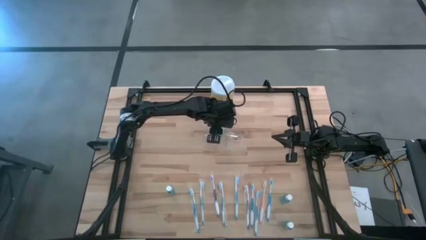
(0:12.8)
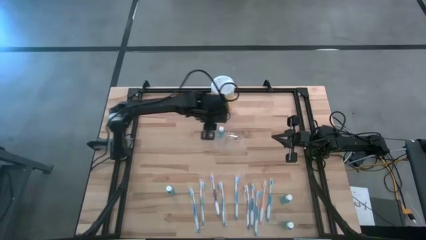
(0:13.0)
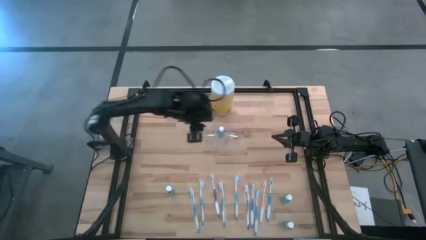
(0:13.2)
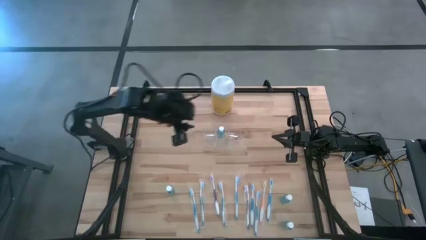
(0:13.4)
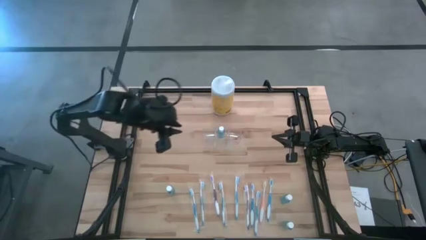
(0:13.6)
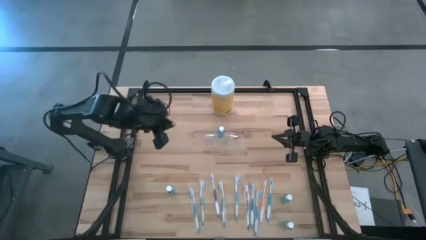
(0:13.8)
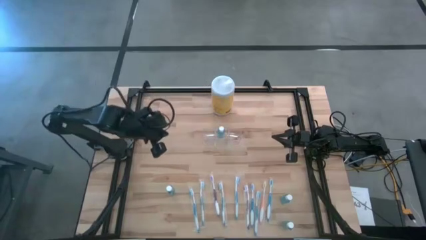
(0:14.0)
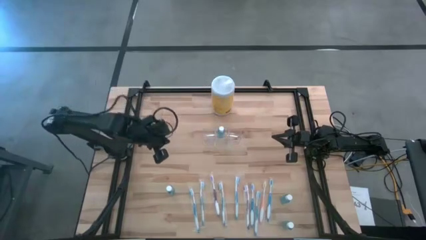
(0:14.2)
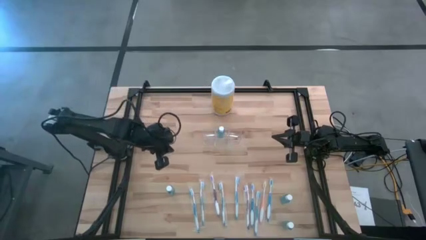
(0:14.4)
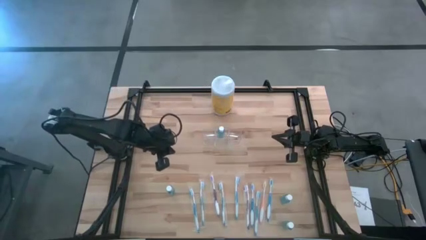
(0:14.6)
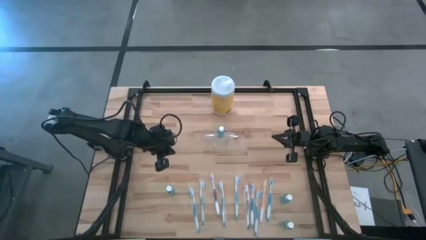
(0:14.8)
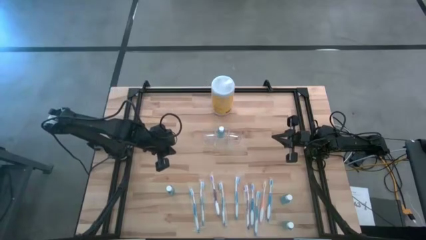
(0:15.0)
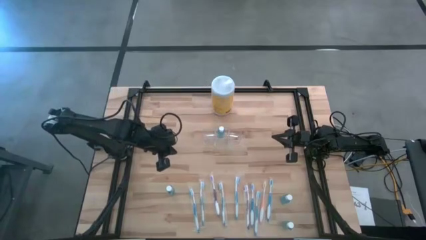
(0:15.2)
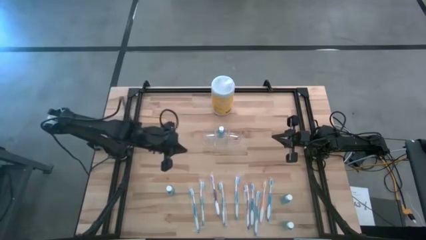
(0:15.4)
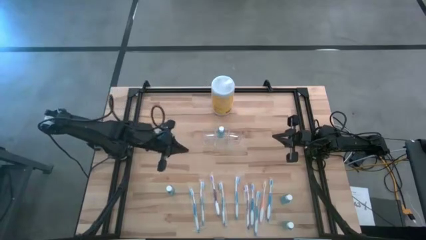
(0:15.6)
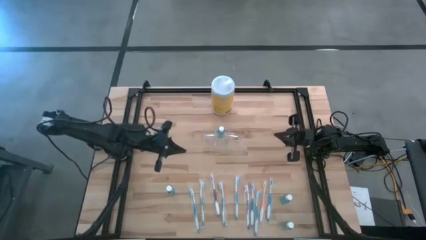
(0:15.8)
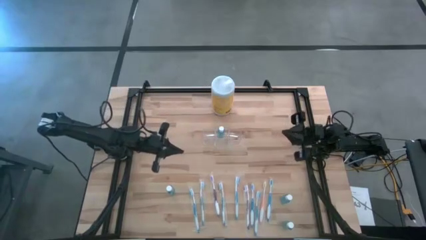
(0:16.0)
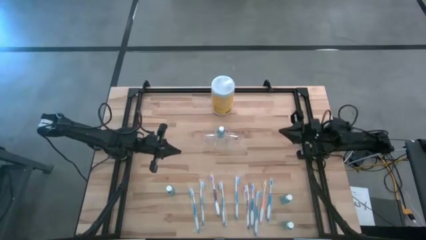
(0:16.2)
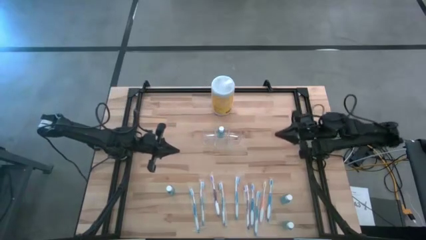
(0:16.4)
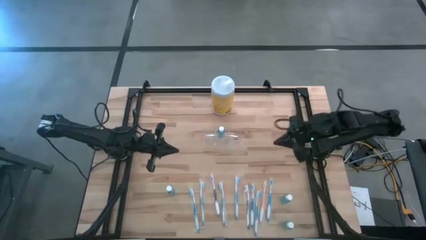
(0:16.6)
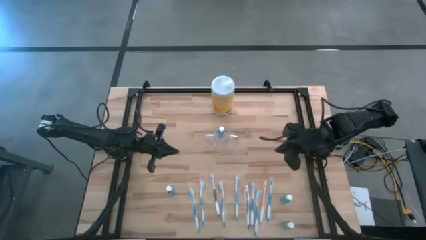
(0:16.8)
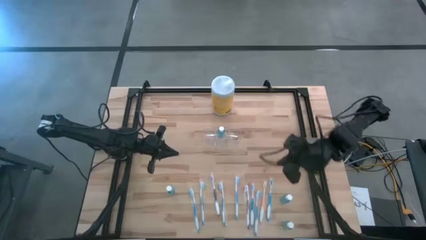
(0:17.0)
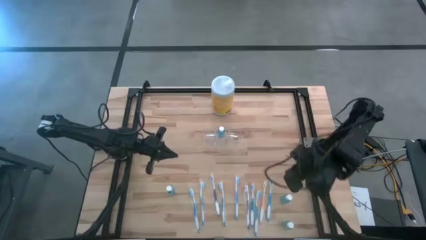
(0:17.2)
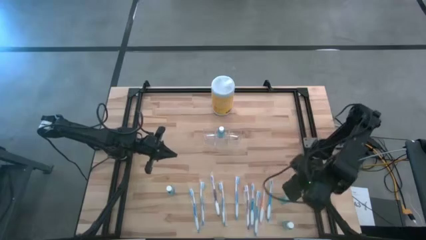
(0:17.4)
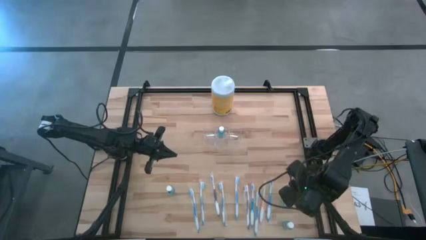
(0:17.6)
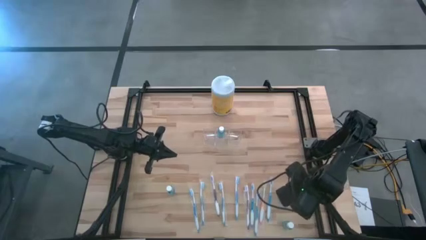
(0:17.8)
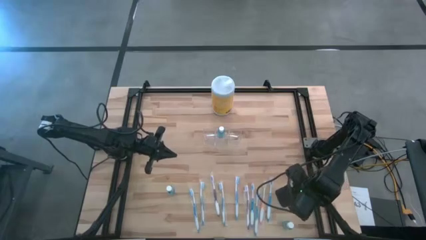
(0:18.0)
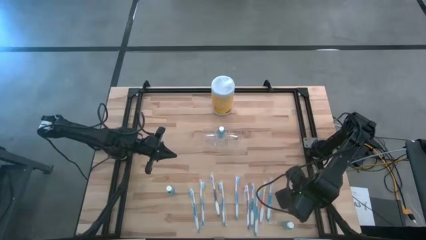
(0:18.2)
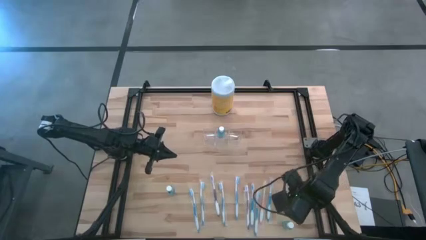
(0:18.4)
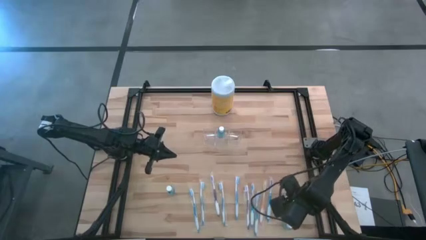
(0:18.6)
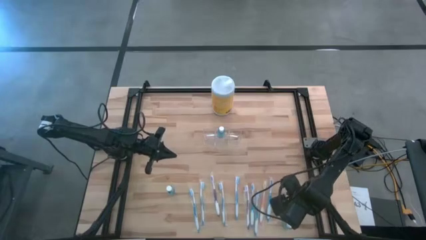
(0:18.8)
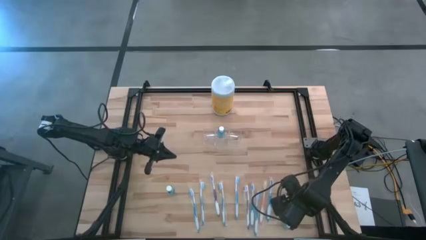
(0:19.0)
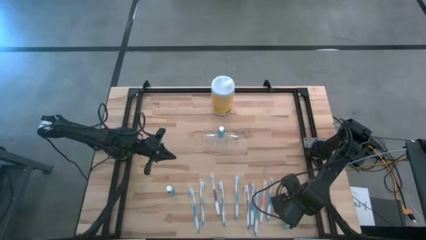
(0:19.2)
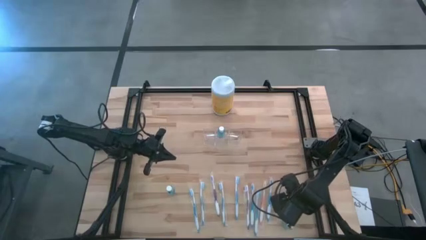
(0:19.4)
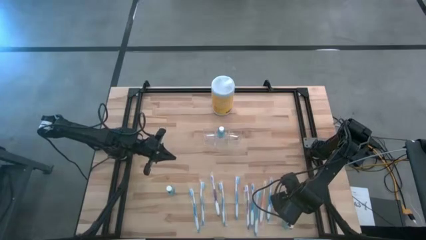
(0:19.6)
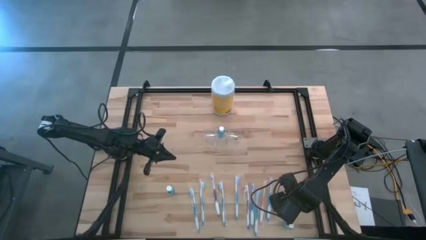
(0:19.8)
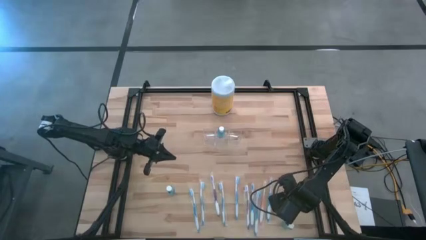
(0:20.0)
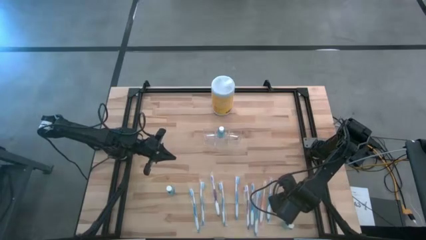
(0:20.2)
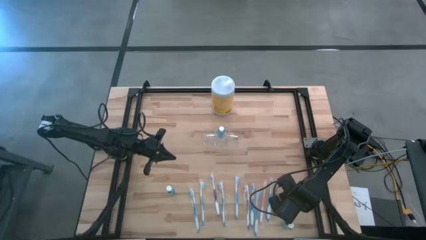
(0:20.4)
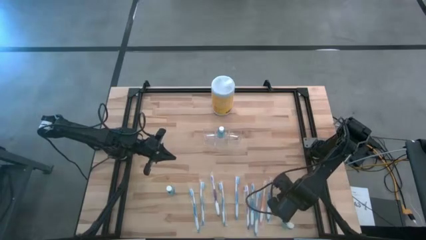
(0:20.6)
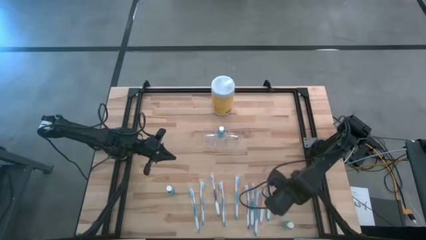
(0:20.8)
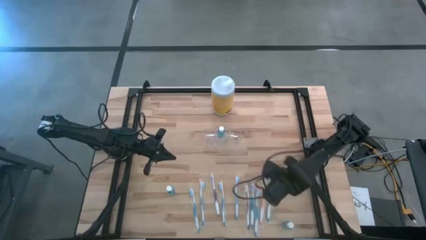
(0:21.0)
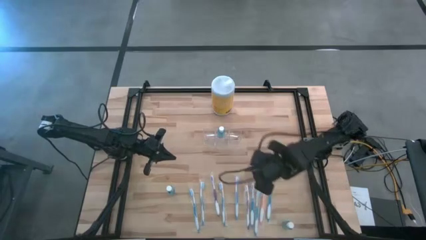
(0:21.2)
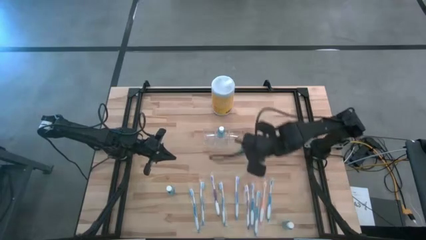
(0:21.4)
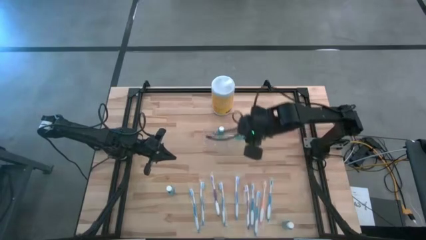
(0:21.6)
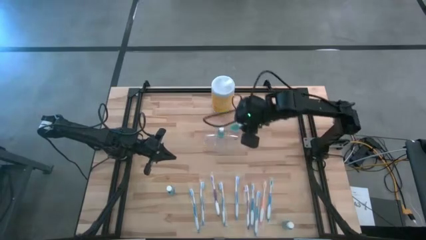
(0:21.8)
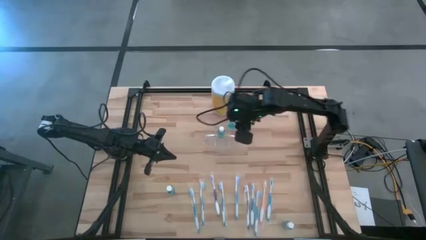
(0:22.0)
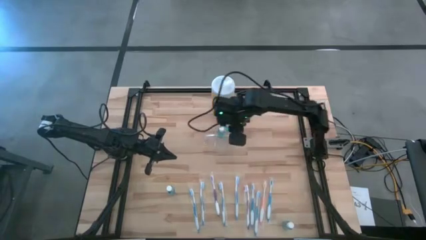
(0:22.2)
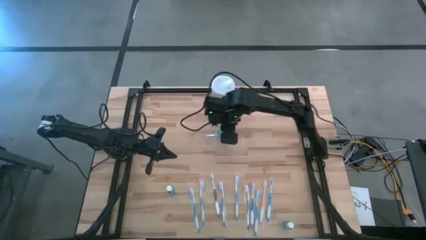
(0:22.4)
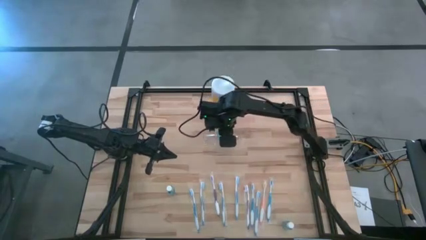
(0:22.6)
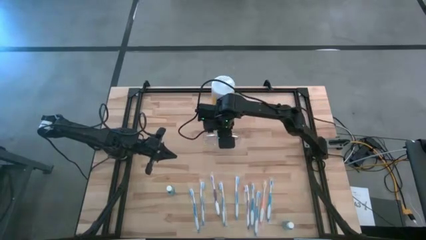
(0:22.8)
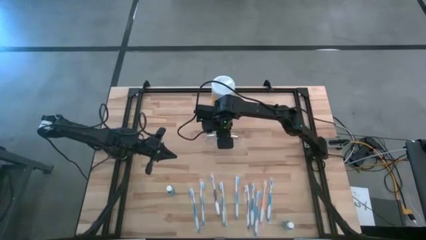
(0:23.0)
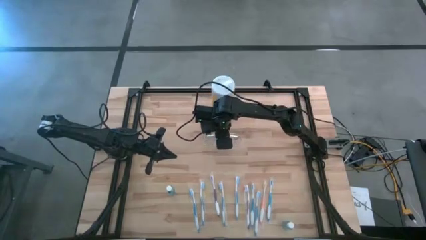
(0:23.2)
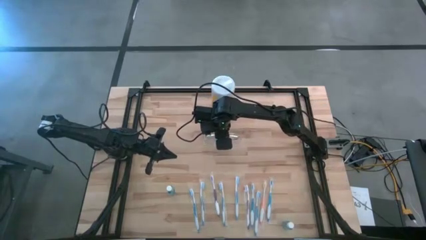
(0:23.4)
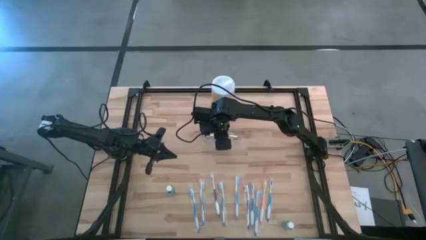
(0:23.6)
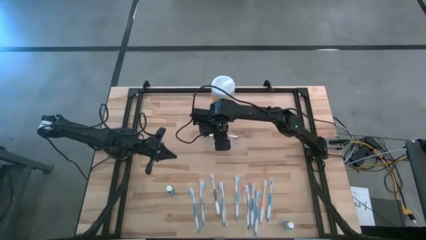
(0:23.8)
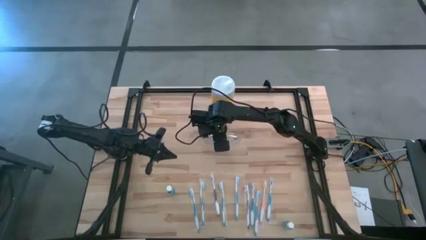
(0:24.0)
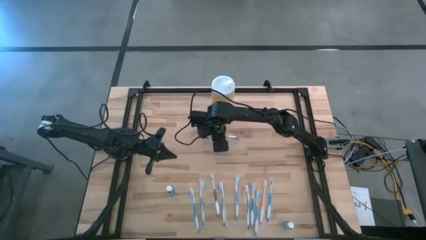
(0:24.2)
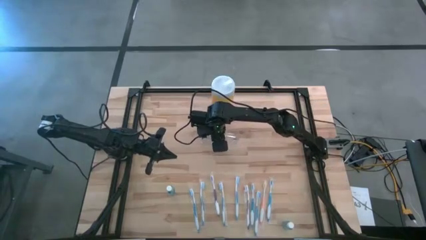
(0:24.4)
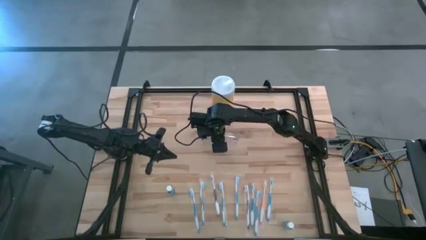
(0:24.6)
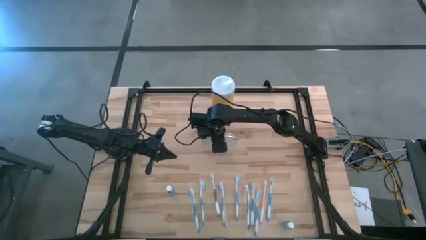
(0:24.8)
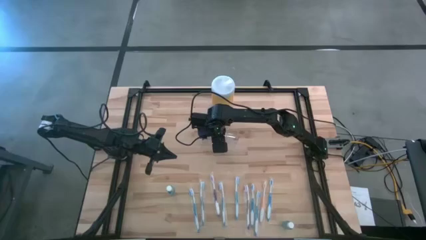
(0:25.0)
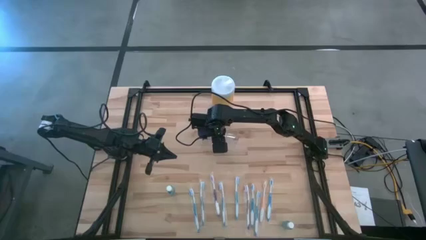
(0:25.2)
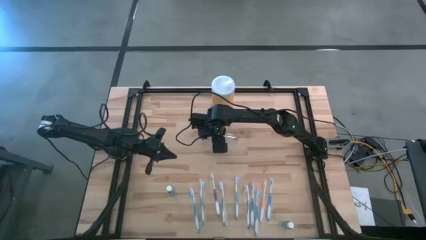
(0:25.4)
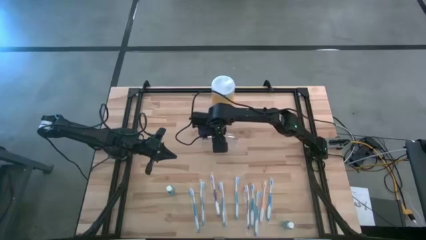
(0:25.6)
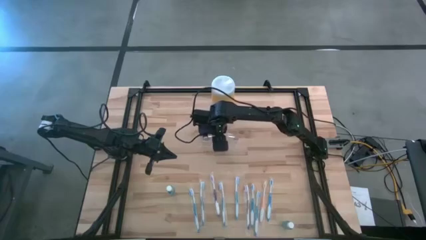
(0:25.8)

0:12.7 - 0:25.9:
Task: Pick & Place toothbrushing station
Put the blue mouthwash into the transparent organizer

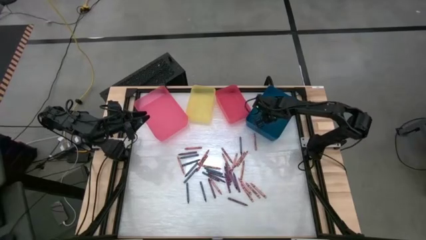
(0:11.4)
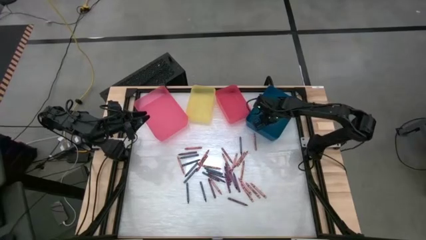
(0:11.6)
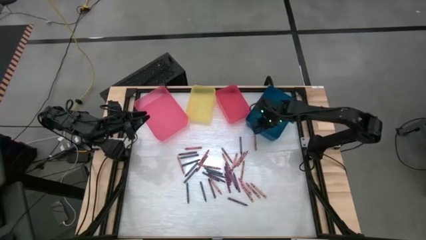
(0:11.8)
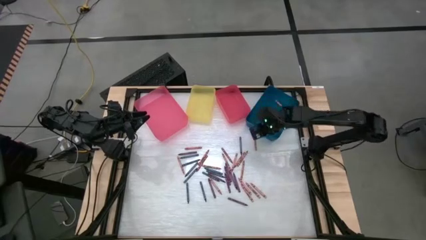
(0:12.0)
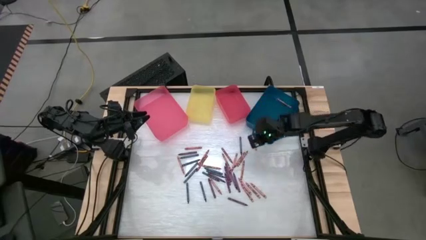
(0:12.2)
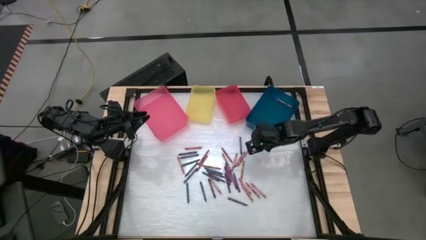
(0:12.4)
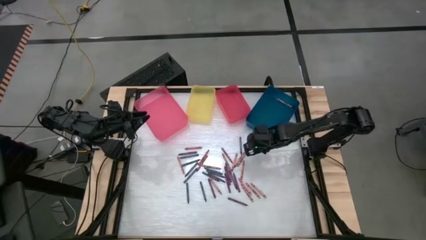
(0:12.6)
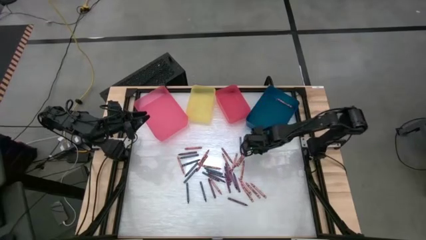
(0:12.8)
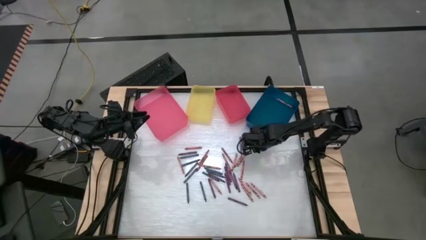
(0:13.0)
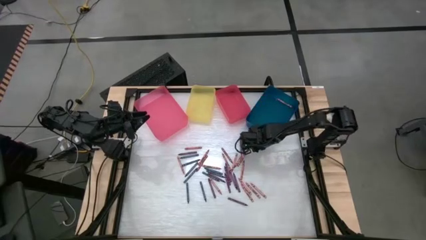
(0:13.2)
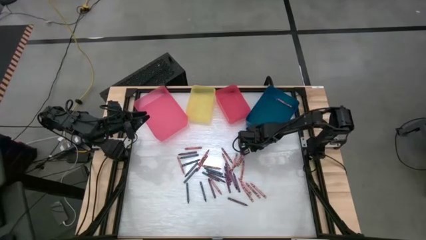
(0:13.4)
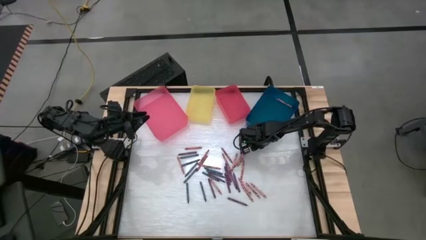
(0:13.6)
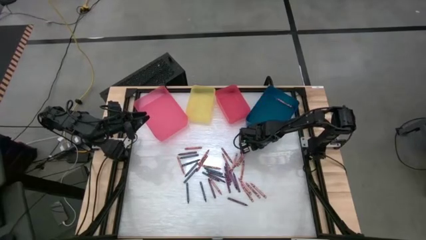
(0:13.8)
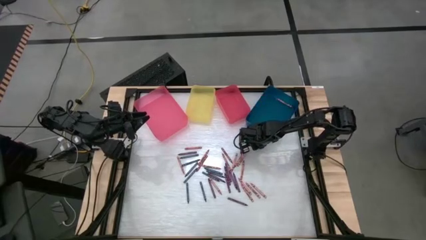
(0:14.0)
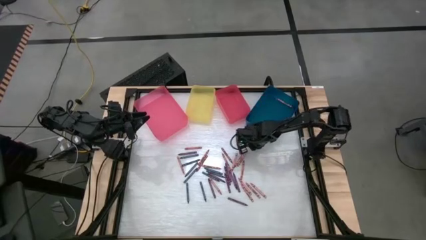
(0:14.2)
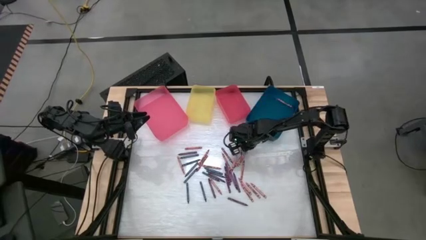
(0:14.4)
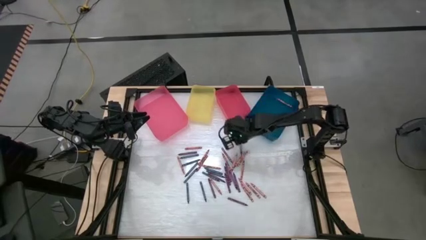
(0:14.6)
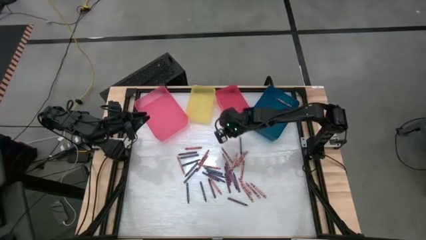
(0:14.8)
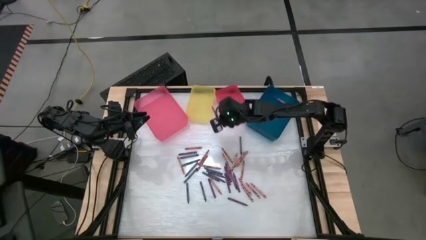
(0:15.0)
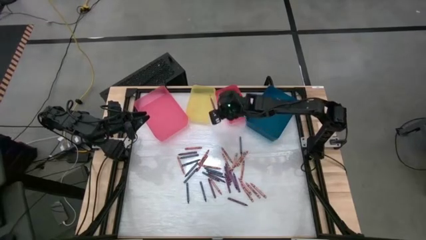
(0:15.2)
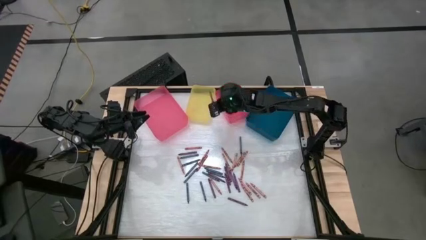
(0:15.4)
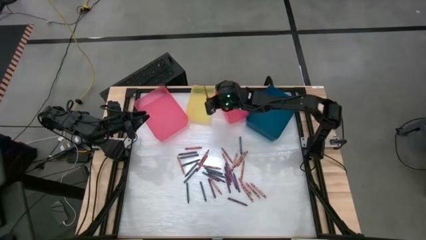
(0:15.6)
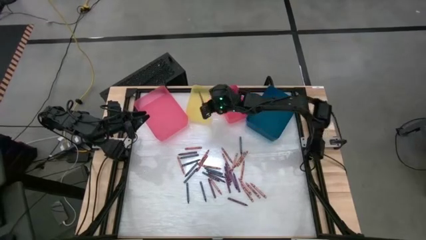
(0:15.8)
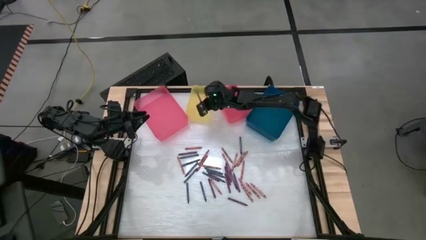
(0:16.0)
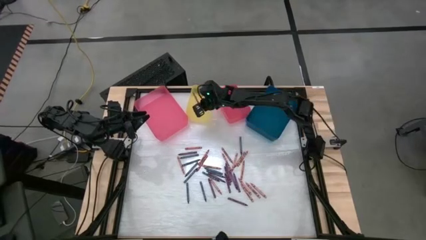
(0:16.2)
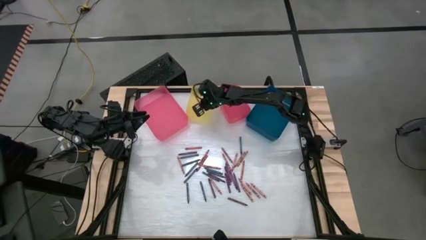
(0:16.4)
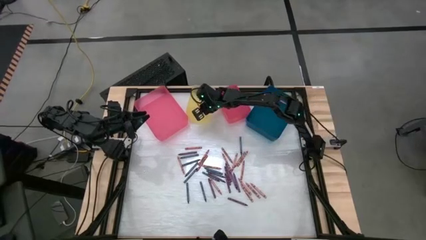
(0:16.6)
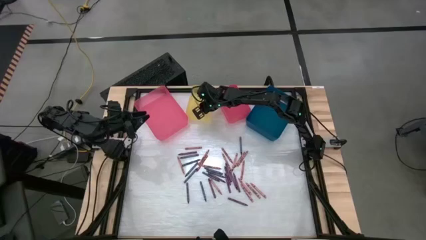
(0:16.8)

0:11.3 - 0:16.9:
Task: Sort crayons
Put the red crayon into the yellow bin
